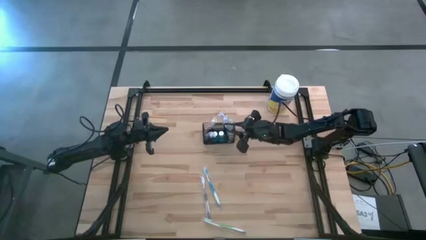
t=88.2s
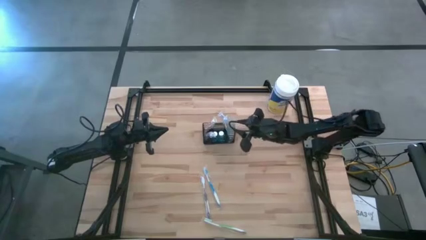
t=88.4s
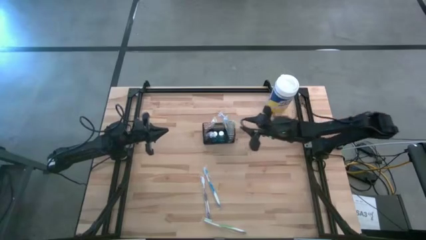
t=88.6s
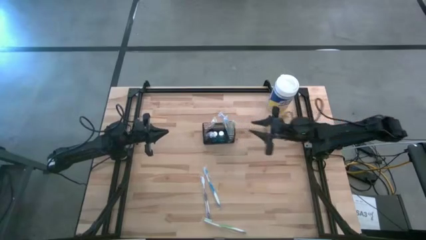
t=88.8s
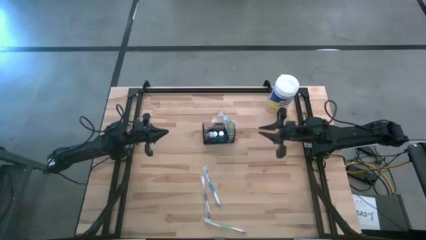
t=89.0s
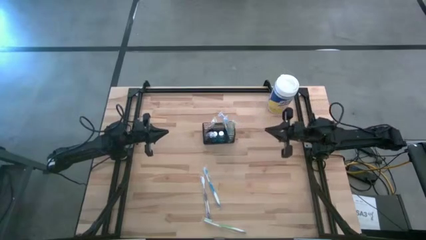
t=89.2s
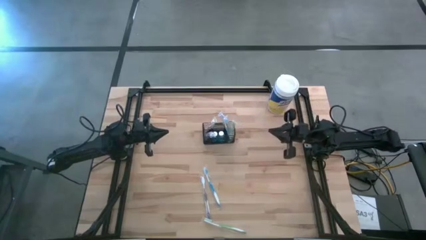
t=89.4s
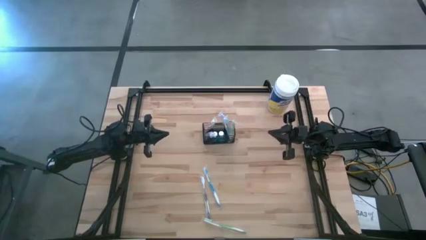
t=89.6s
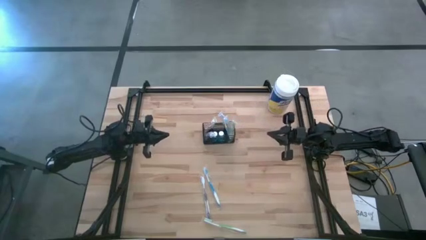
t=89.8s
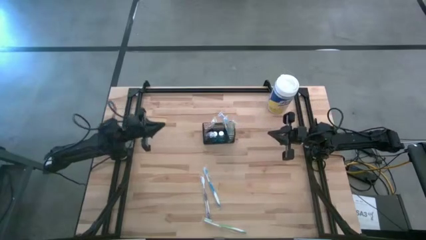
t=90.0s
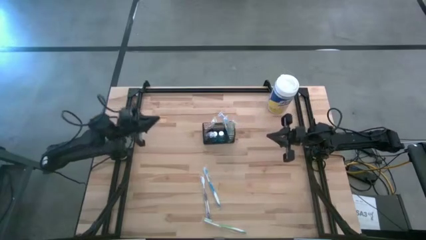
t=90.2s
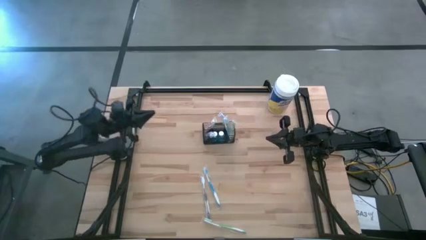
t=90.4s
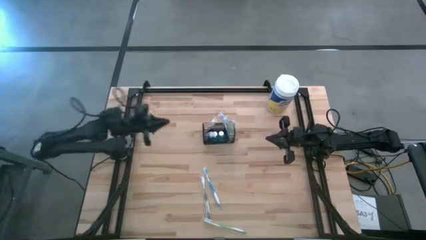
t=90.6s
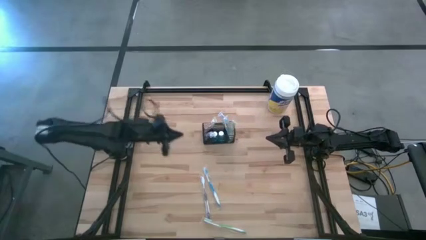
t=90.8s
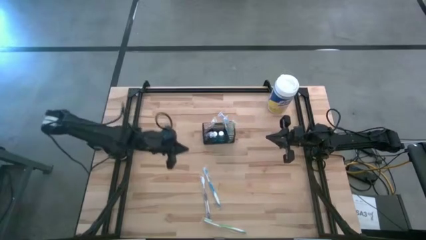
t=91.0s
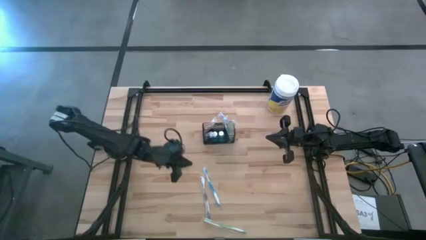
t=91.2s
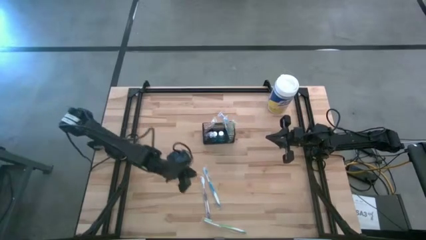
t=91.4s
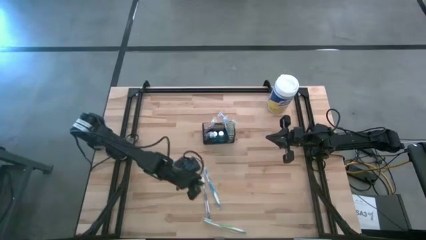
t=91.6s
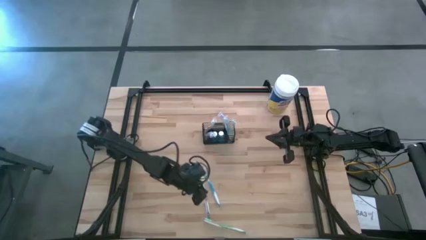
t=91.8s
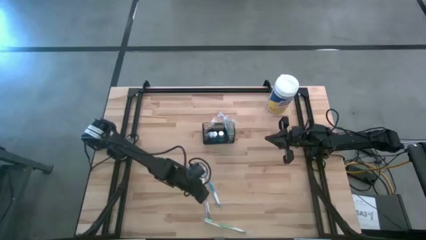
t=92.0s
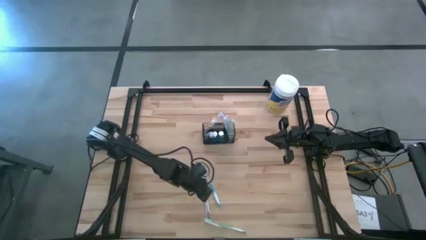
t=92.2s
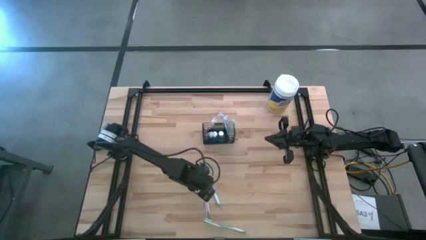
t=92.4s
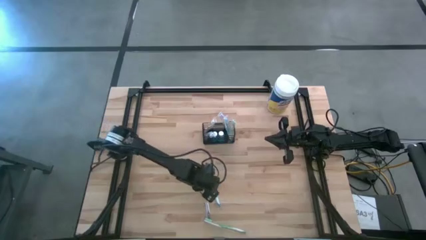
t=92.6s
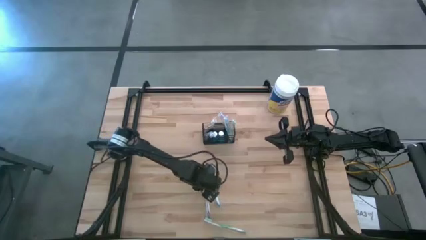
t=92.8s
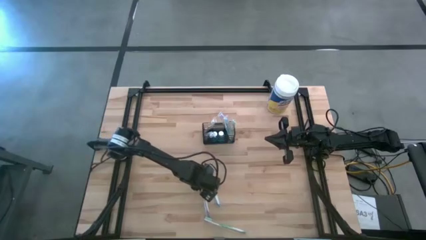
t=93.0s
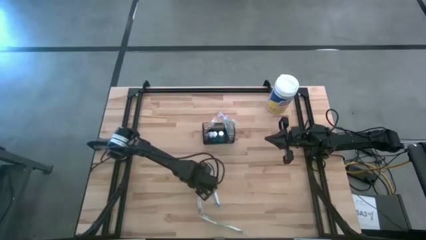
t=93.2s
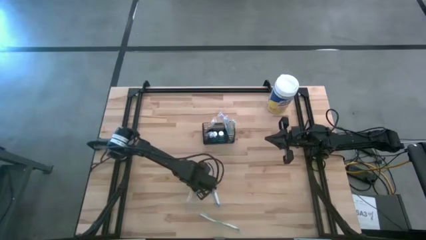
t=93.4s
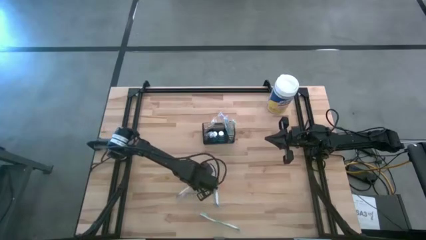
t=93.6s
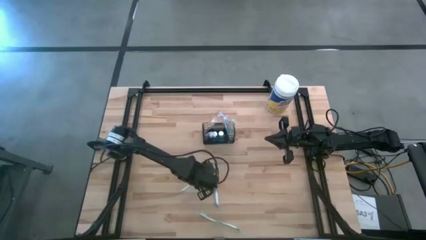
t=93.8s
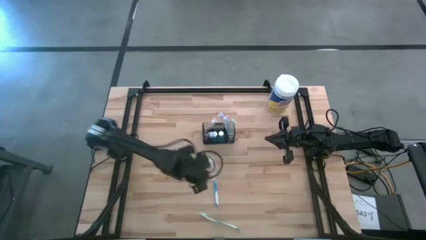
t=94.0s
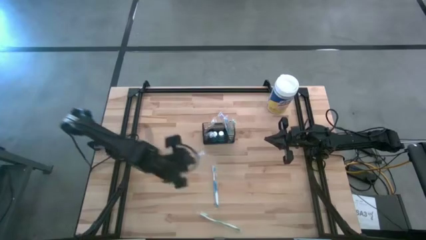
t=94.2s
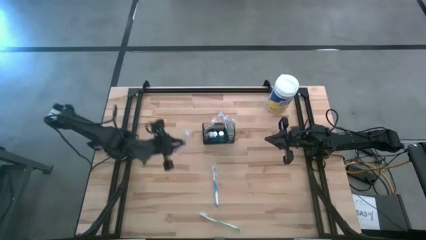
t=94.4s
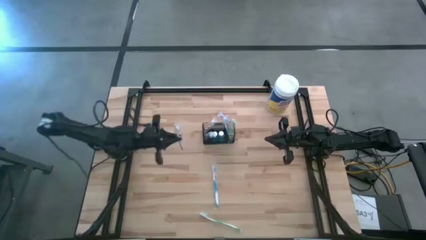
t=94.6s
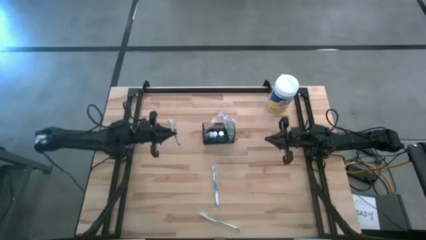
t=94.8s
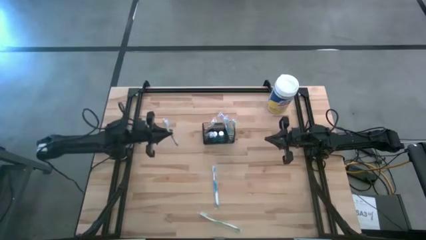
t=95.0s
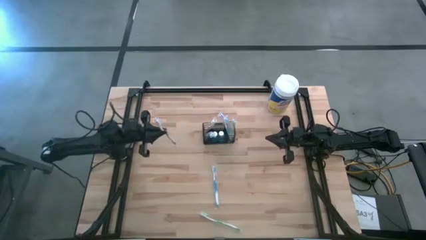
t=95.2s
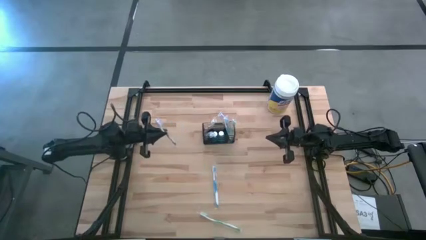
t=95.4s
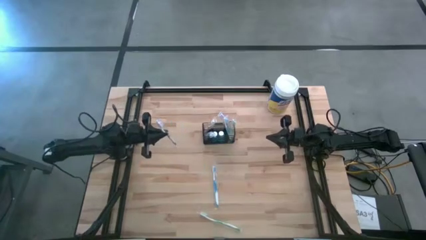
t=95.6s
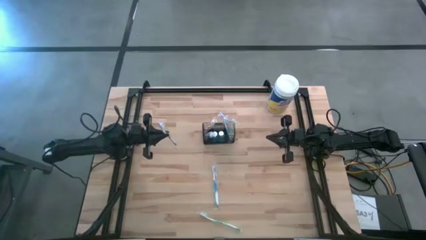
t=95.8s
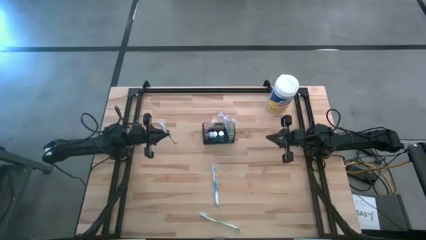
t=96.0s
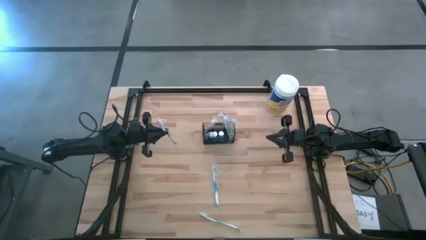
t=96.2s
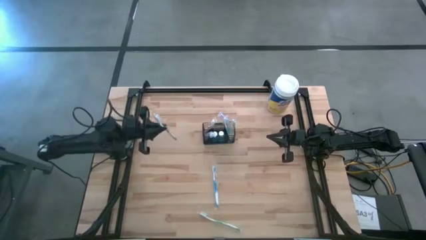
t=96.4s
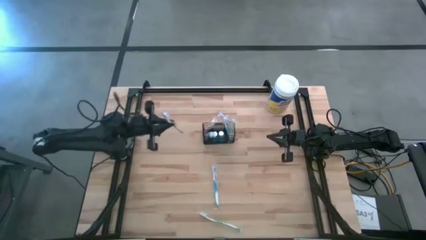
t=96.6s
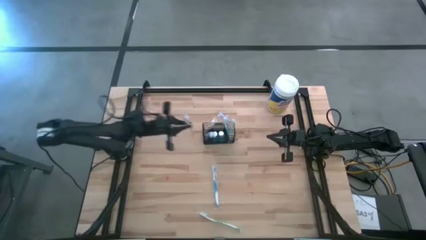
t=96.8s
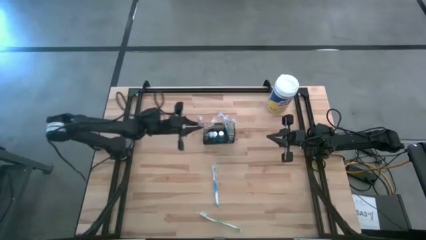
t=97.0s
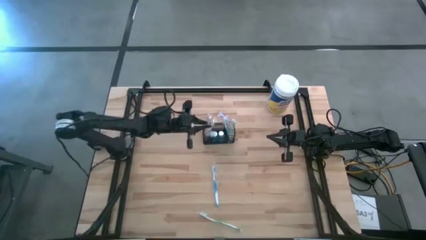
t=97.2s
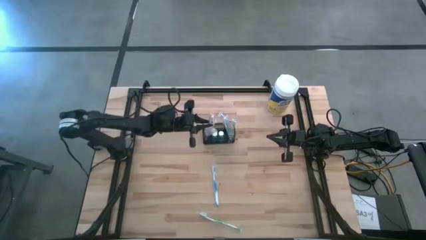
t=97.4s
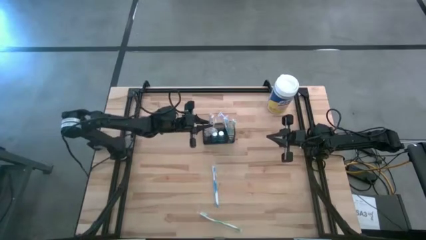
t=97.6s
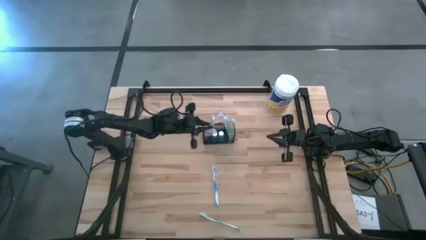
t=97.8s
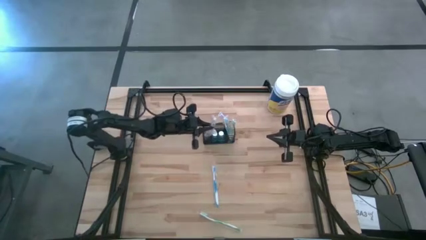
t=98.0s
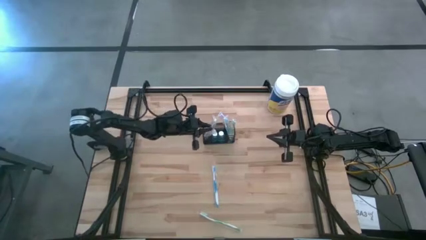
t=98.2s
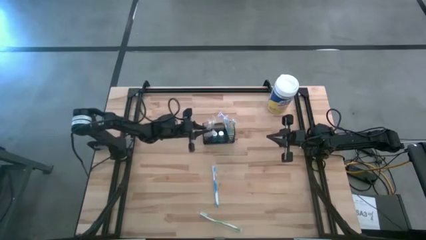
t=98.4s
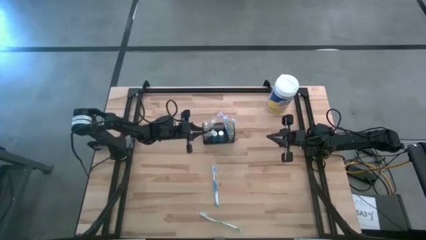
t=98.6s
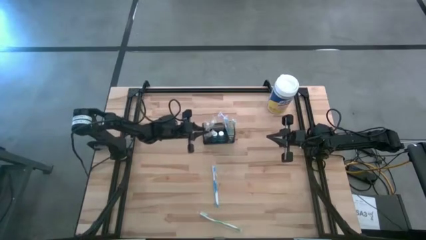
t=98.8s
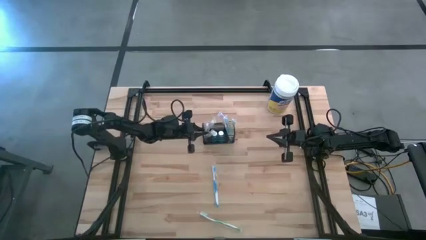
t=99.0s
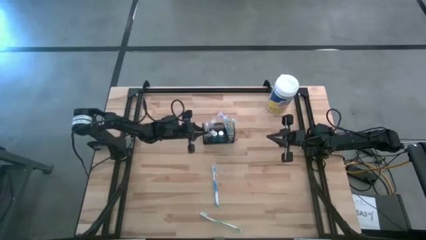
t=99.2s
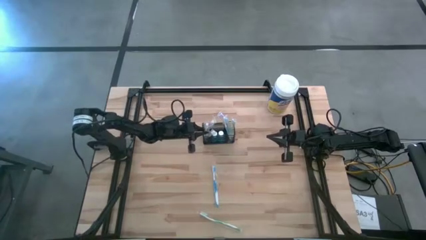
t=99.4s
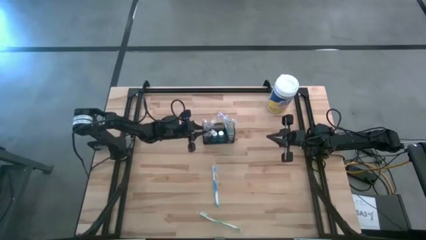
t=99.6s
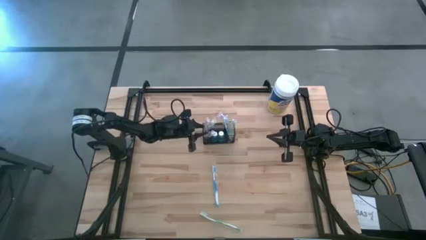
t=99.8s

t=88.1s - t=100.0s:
Task: Pick & Place toothbrushing station
Put the violet toothbrush into the mesh organizer
